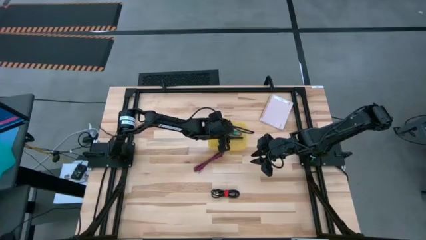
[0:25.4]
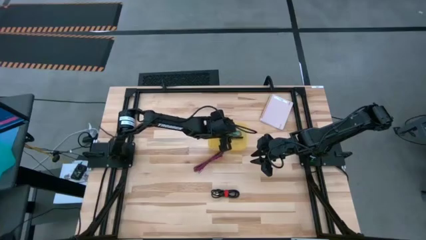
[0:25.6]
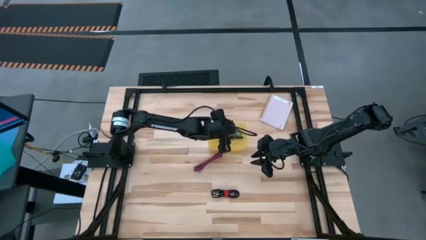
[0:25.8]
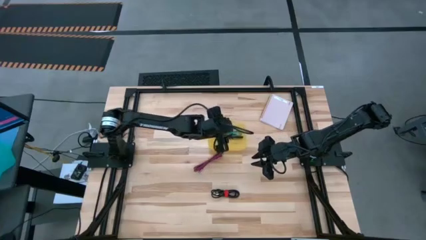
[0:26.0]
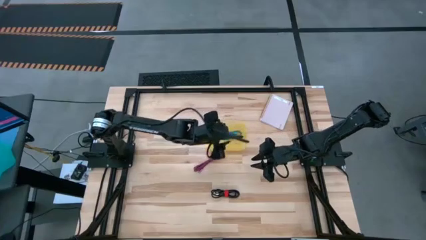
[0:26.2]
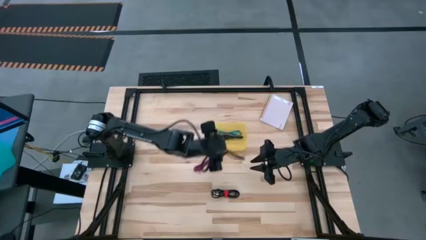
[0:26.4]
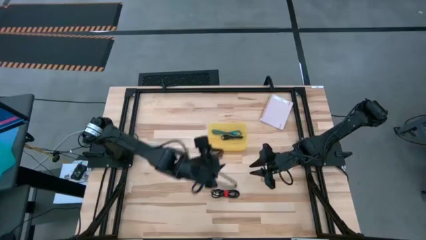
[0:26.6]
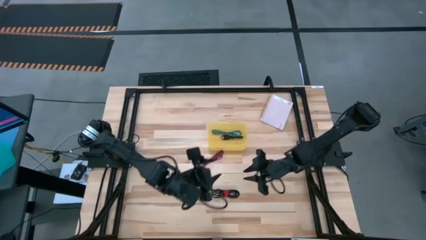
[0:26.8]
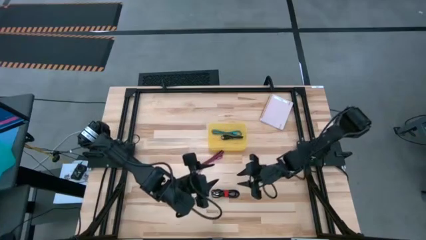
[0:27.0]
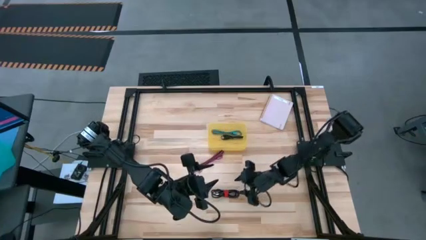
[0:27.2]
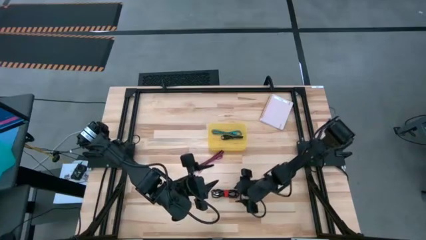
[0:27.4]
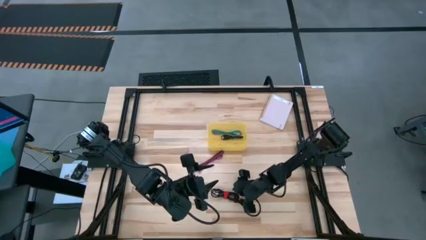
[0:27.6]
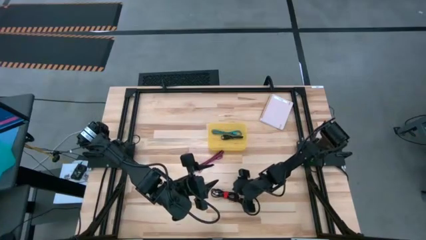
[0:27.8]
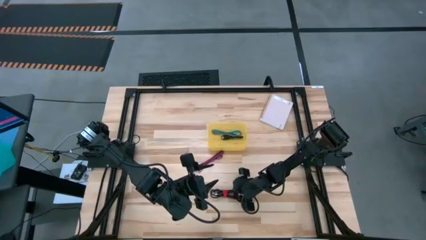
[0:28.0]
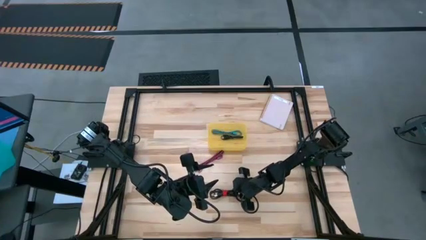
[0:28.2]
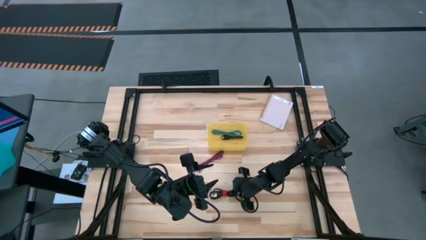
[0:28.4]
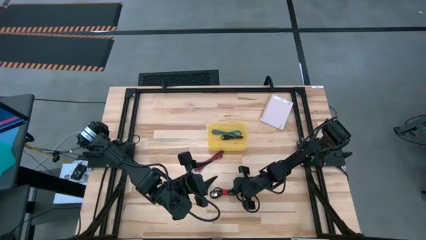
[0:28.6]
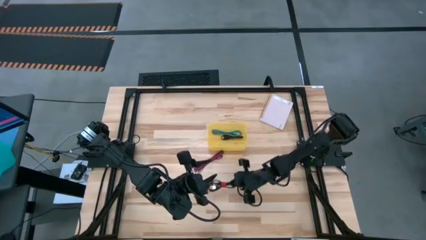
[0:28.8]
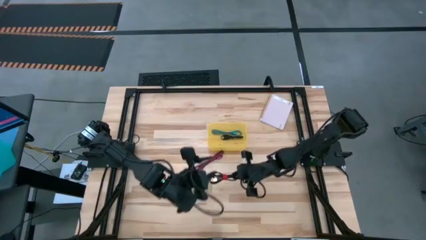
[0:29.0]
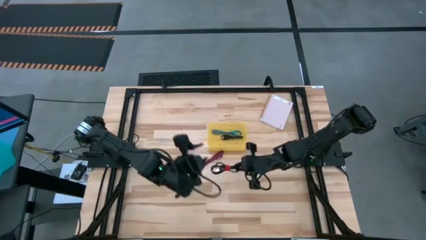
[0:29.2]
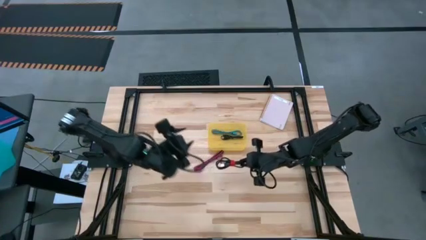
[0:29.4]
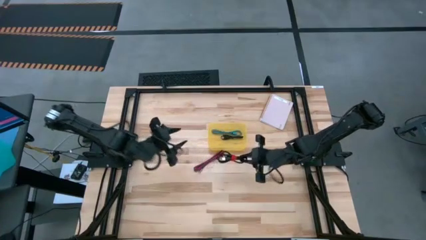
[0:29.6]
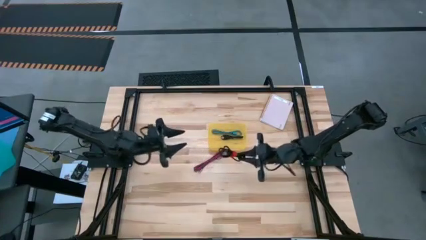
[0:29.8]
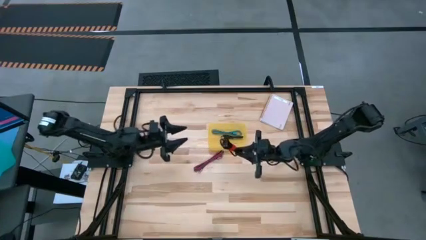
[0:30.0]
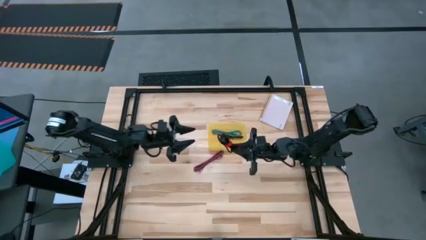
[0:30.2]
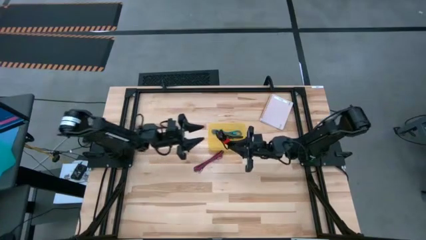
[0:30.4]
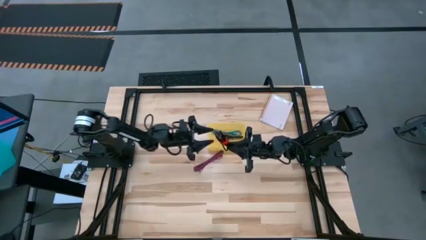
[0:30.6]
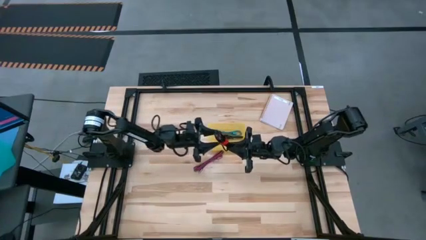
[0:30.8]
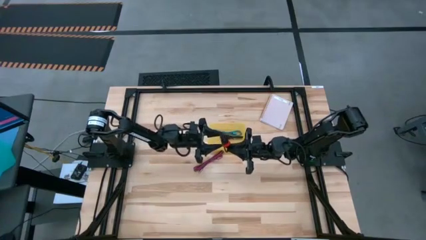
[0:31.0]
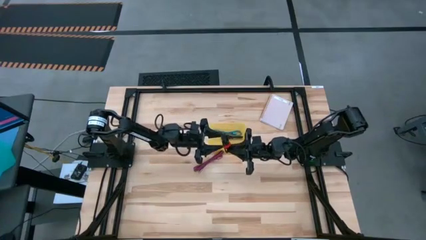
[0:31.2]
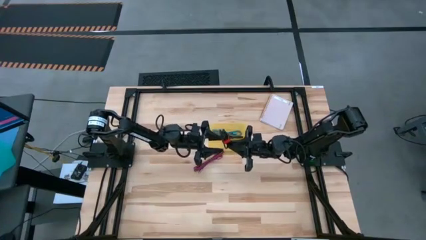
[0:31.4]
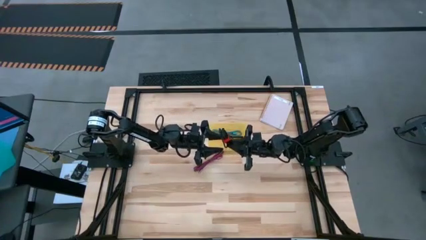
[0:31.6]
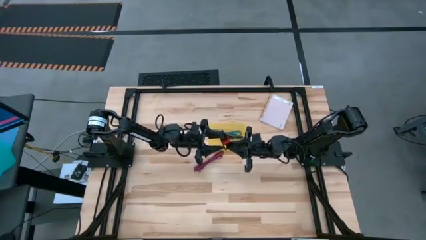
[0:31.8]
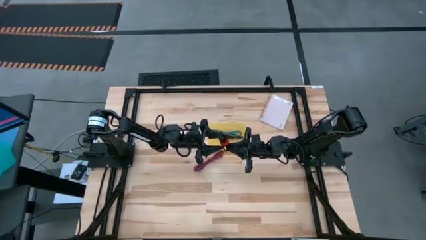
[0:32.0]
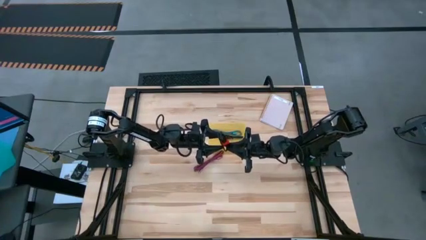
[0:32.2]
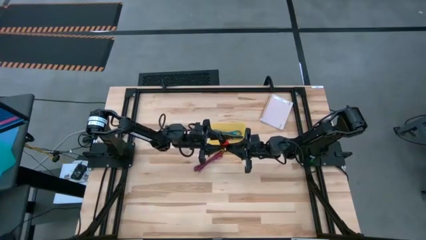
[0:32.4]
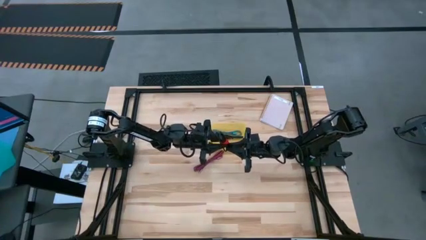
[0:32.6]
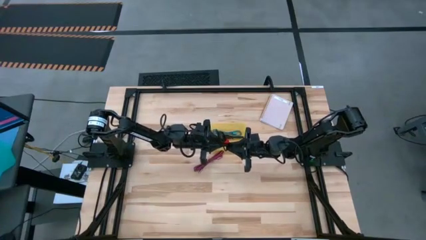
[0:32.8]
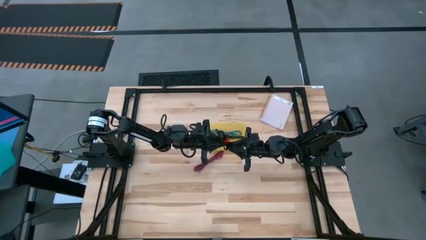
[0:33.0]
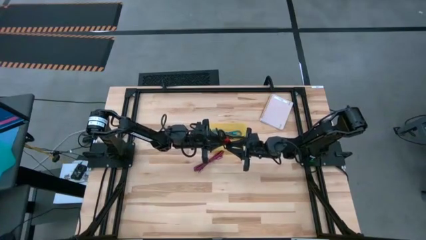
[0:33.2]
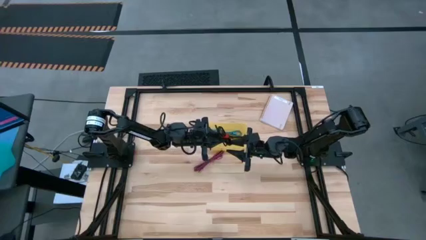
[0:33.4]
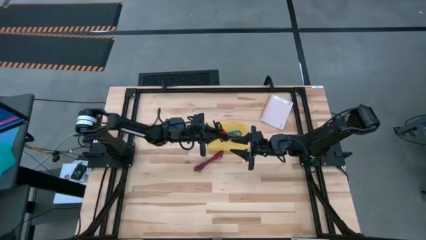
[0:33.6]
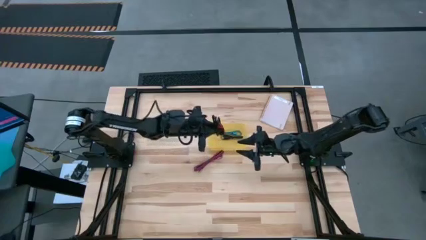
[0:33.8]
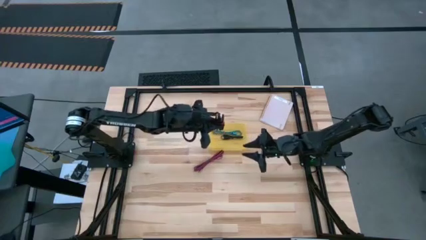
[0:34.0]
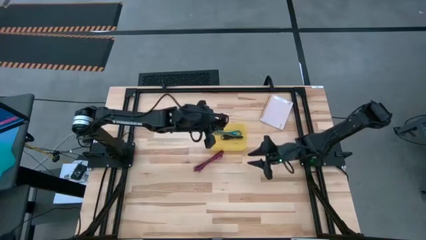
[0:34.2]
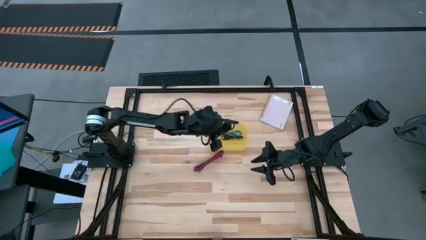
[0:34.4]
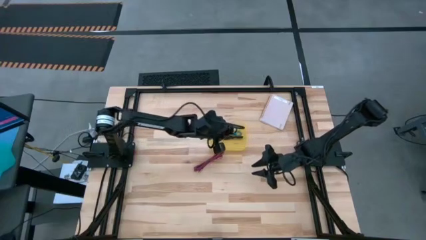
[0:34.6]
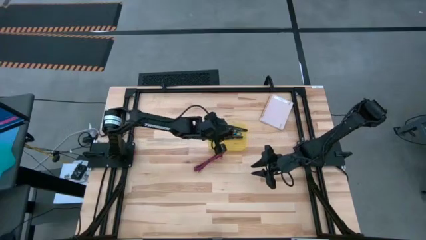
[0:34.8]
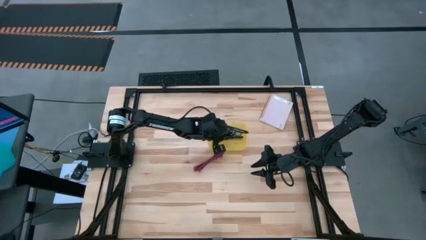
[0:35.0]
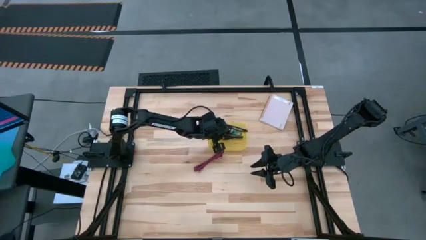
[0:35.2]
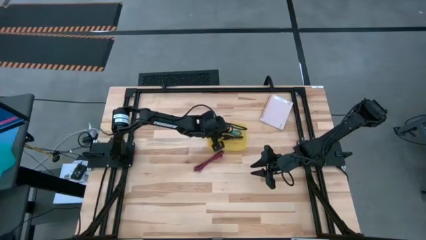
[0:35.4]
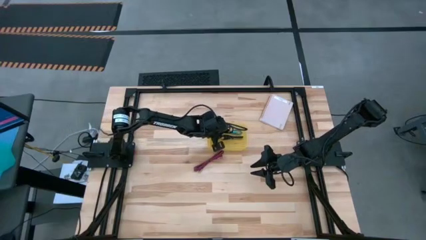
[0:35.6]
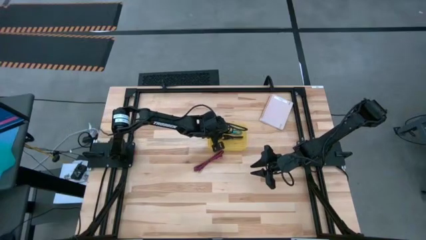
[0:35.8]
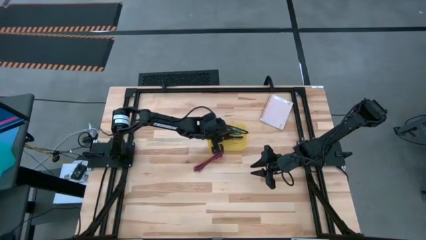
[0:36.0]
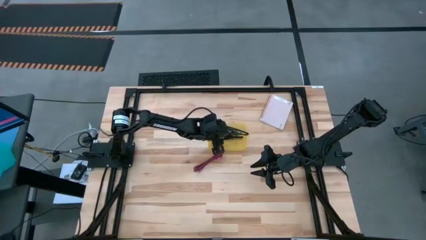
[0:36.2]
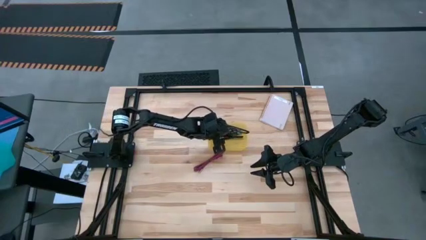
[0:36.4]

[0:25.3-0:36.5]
Task: Pick and place USB-C Cables
Put the black charger cable into the yellow bin
